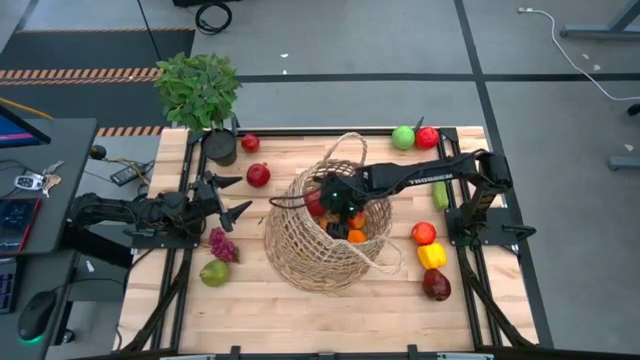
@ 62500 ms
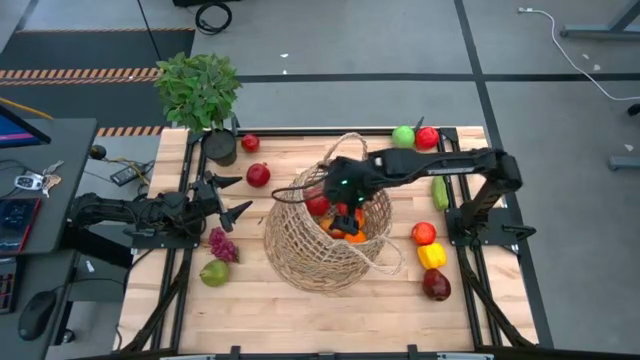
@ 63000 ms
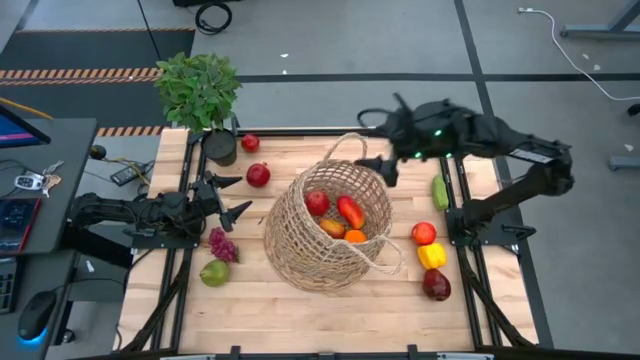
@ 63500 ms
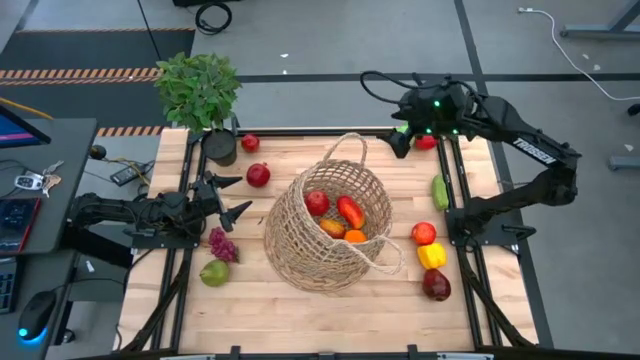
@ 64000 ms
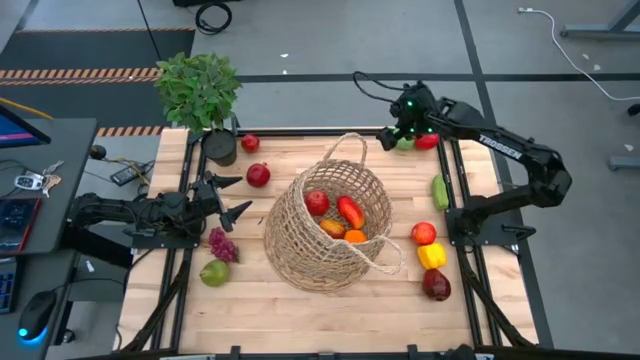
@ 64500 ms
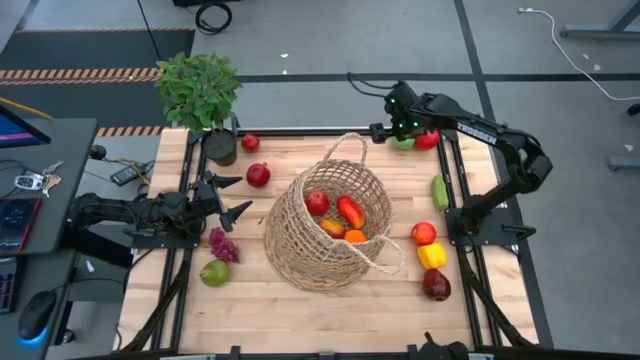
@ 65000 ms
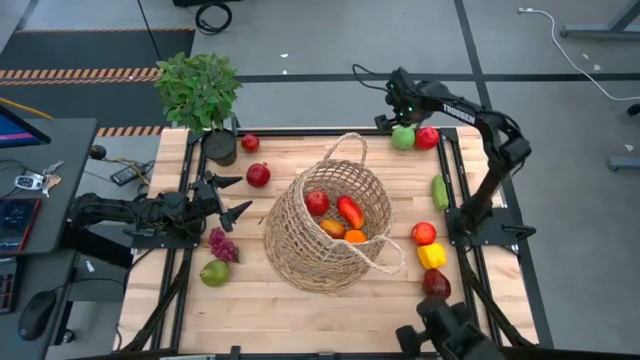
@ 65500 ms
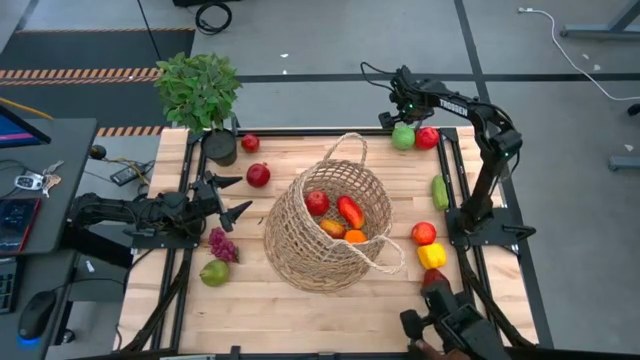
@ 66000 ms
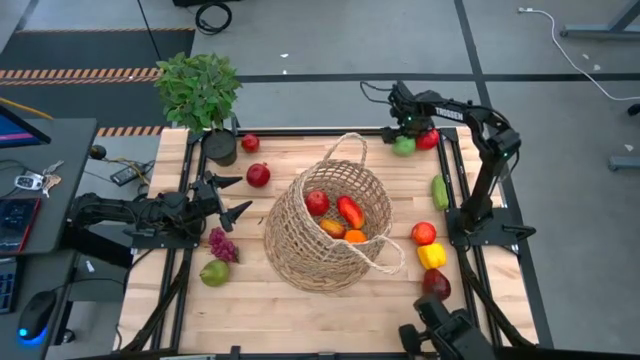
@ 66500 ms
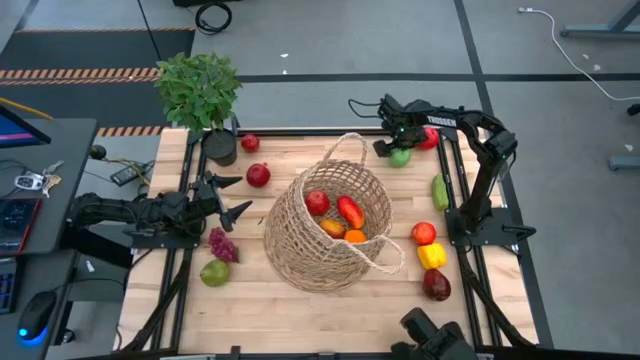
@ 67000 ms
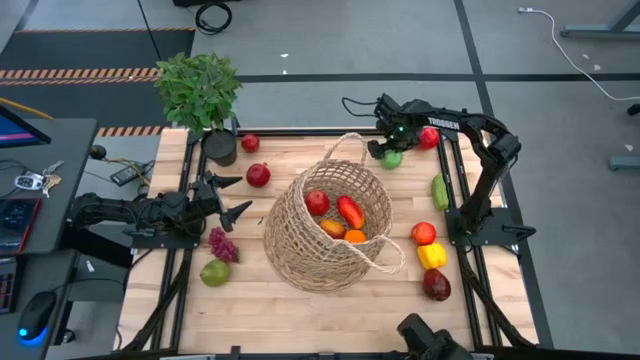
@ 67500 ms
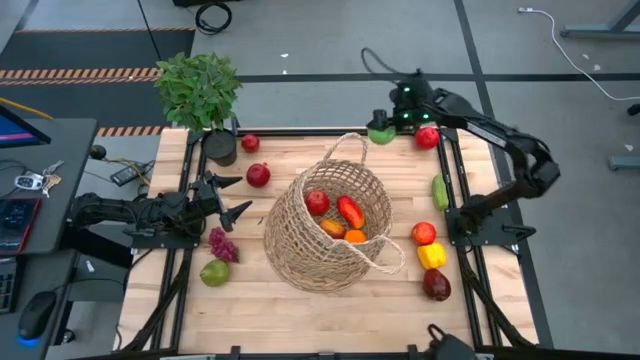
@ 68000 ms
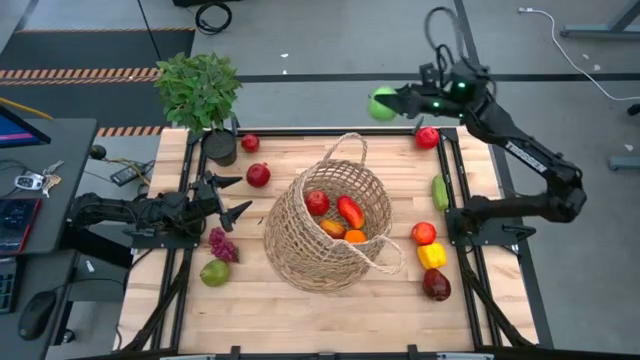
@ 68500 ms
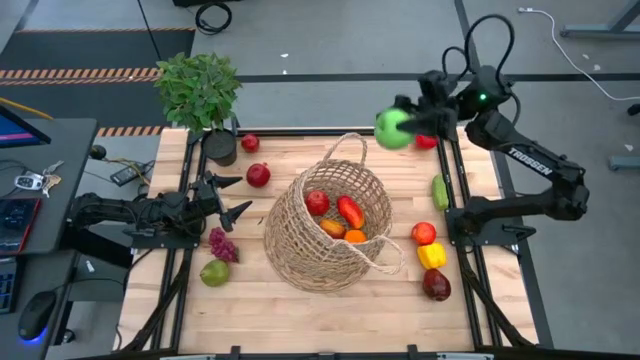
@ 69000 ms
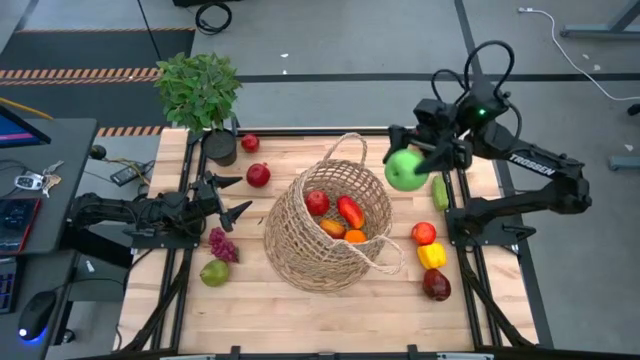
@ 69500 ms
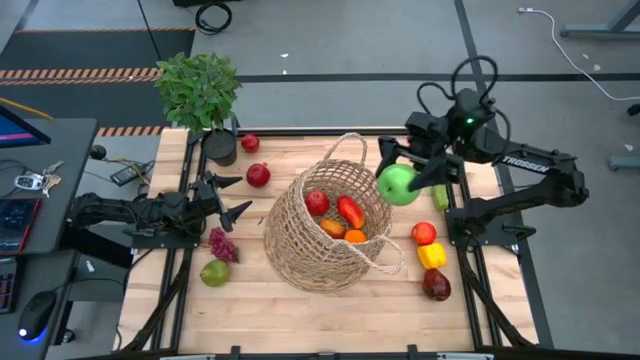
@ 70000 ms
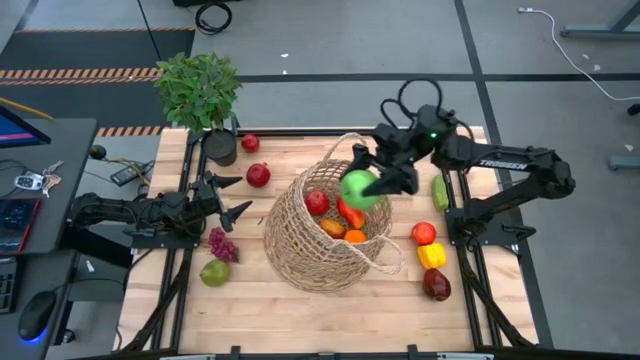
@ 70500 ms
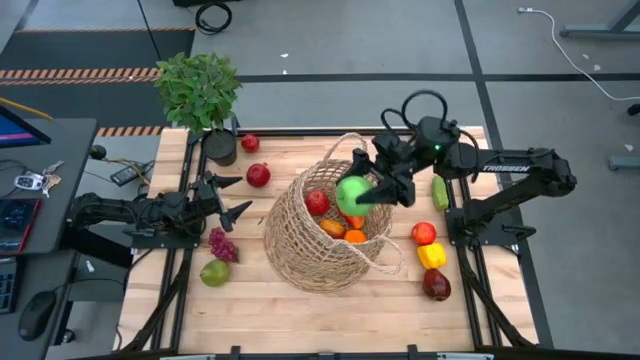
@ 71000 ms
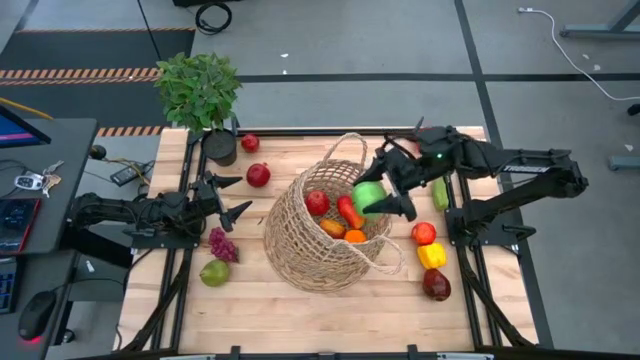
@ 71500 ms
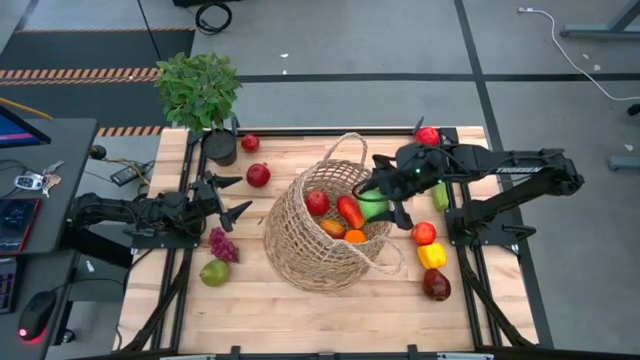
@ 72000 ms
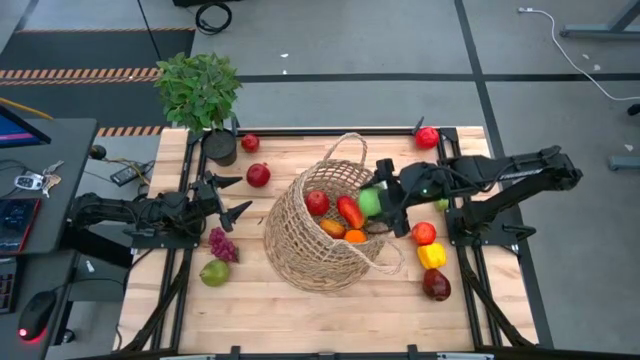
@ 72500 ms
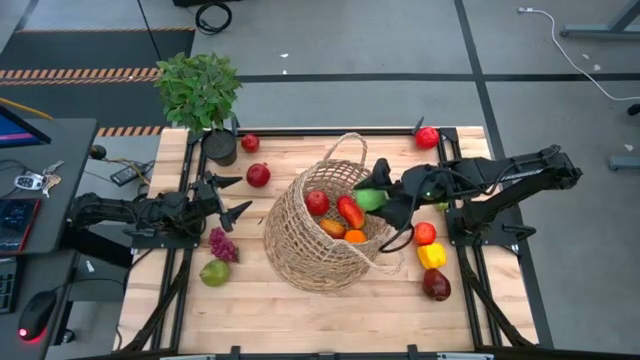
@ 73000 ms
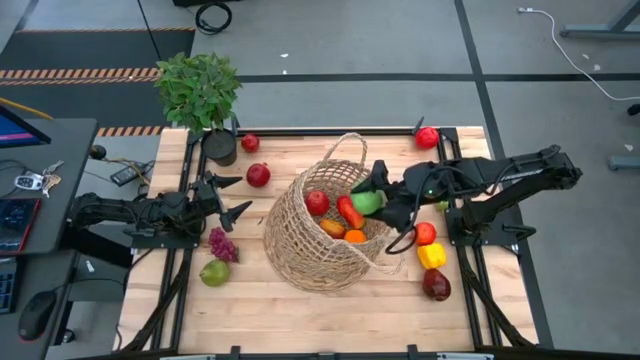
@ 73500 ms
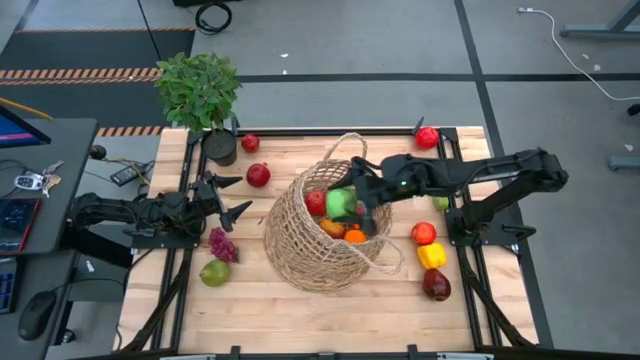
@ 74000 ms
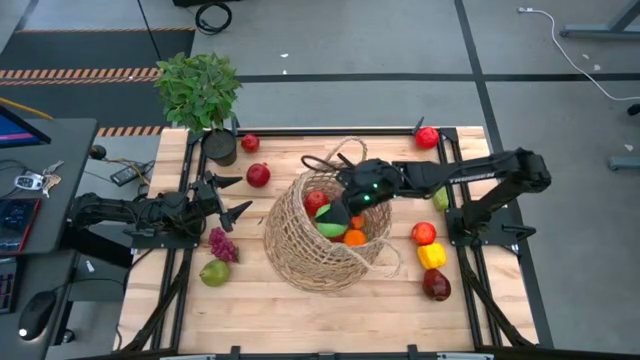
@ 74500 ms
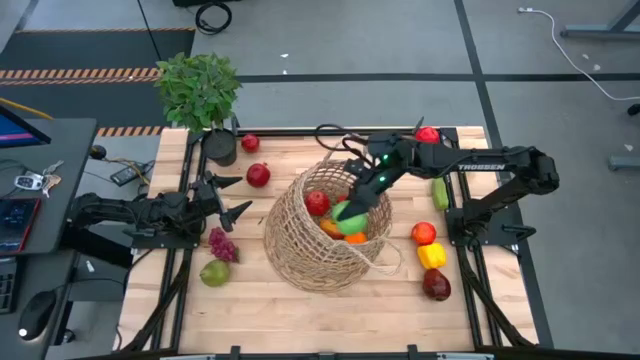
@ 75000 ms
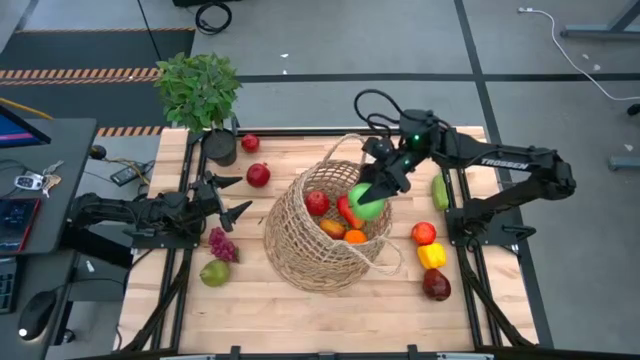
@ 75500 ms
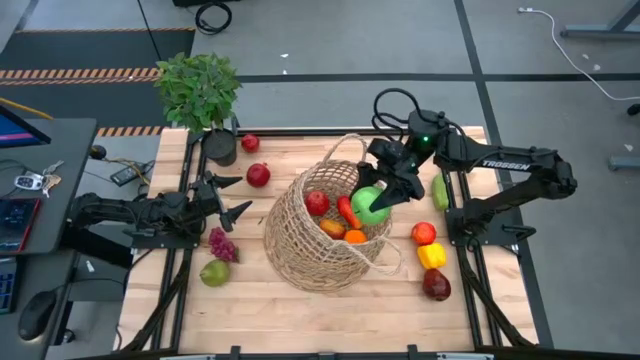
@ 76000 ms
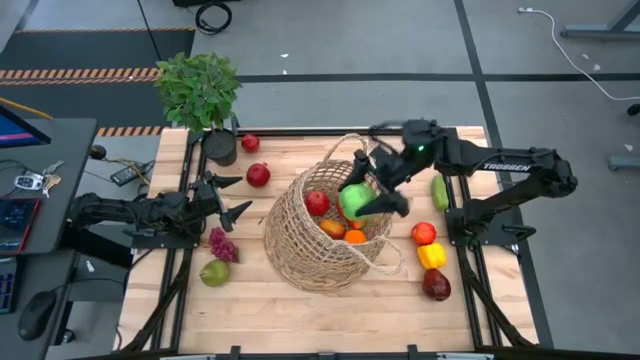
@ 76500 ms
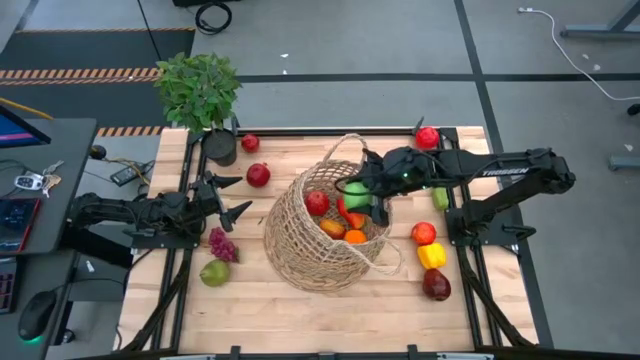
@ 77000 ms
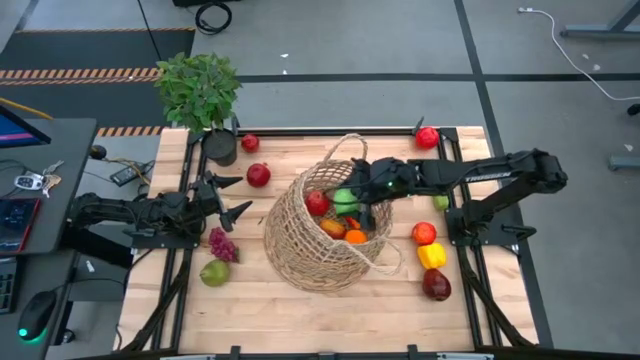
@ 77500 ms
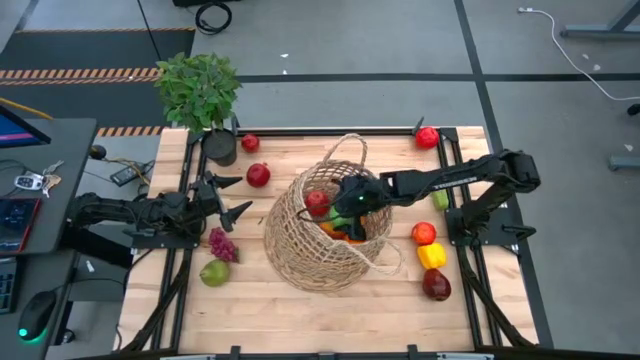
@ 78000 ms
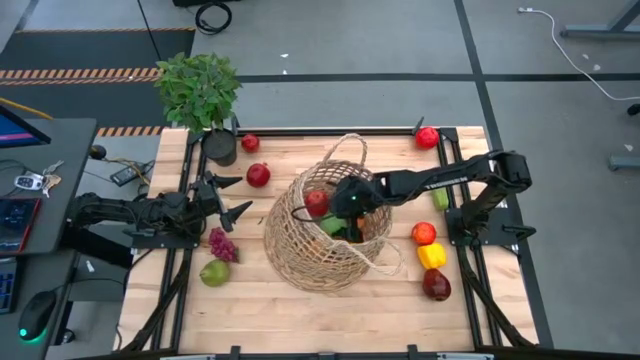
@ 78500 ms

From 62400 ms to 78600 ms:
Task: Build produce basket
Put the green apple into the brown basket

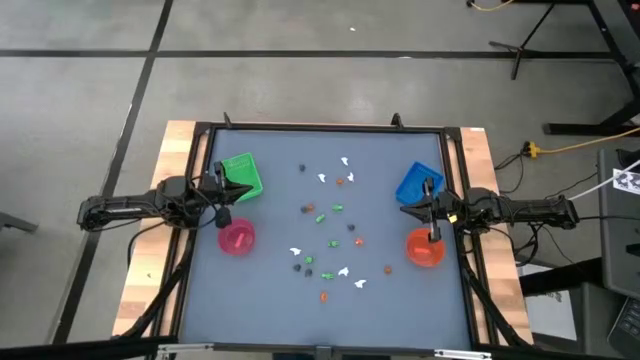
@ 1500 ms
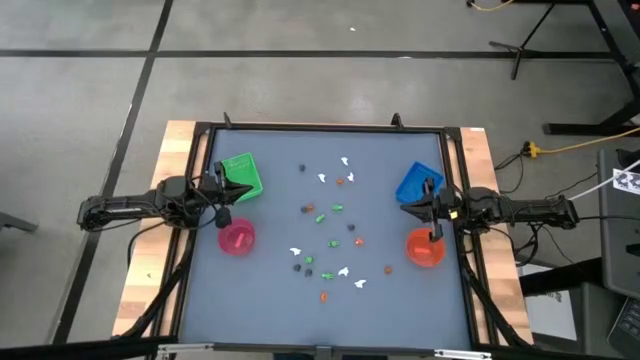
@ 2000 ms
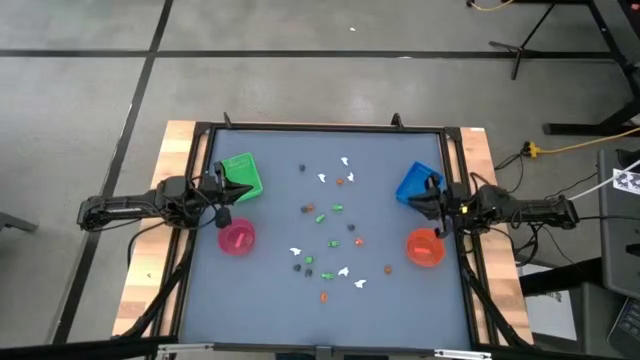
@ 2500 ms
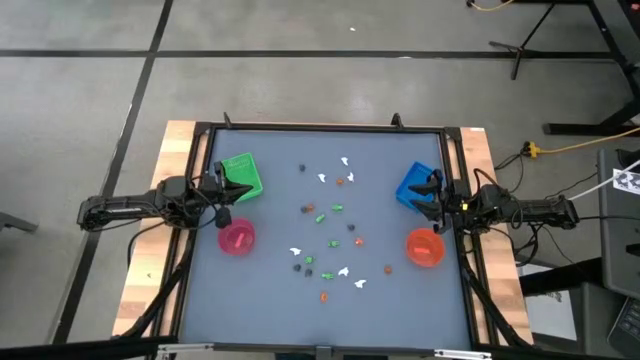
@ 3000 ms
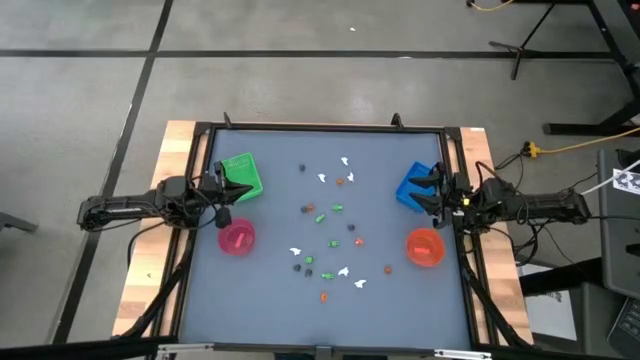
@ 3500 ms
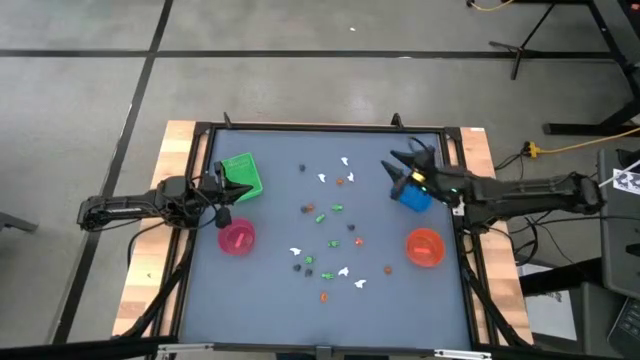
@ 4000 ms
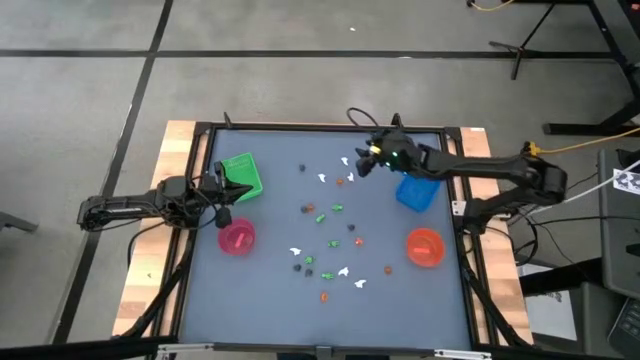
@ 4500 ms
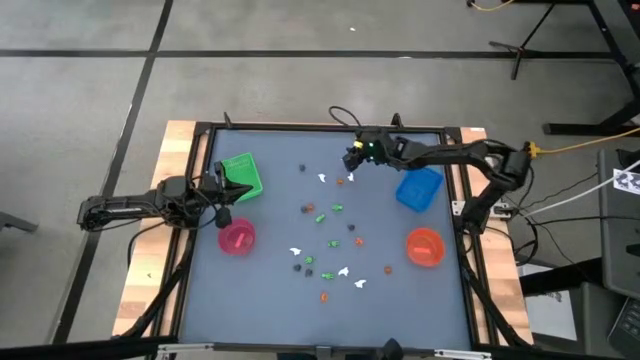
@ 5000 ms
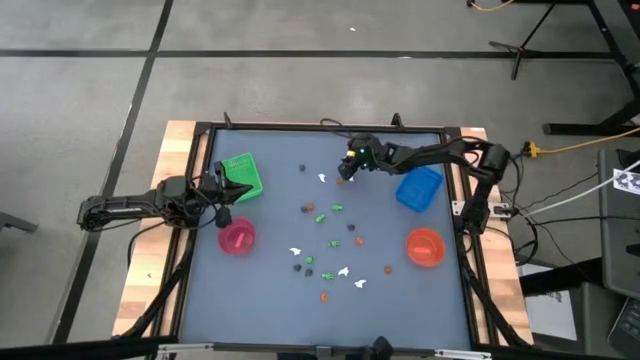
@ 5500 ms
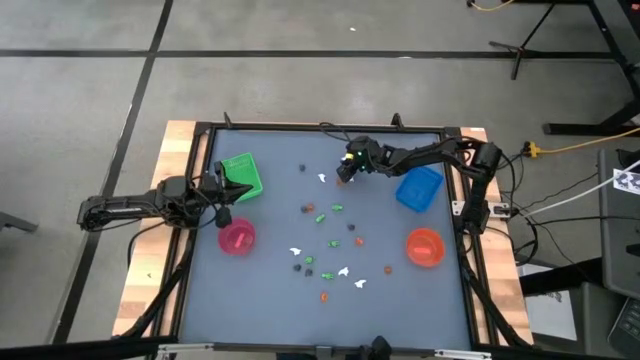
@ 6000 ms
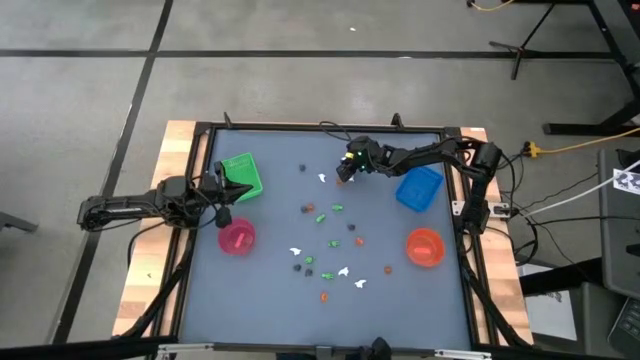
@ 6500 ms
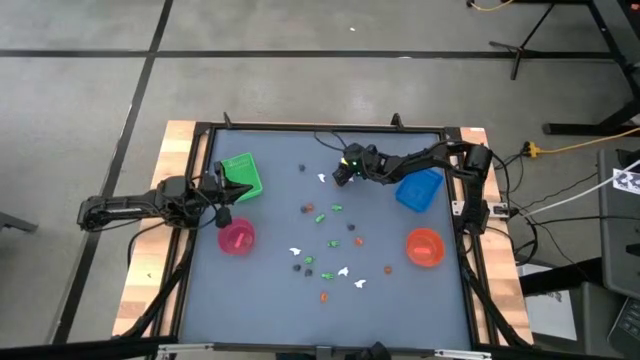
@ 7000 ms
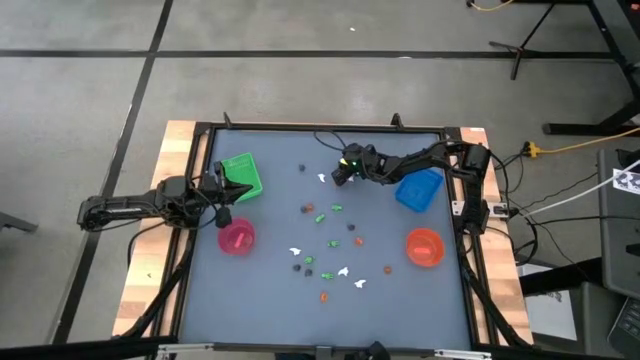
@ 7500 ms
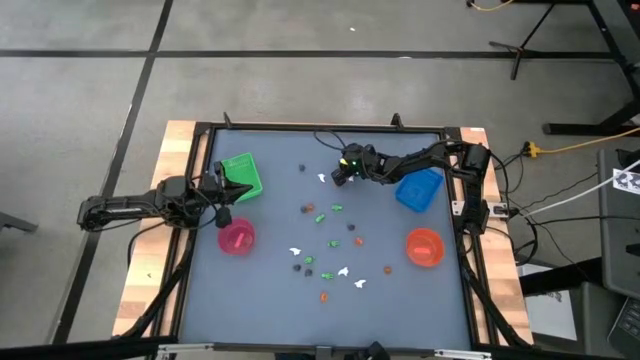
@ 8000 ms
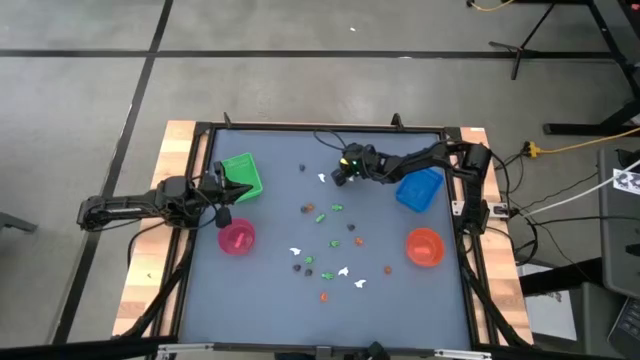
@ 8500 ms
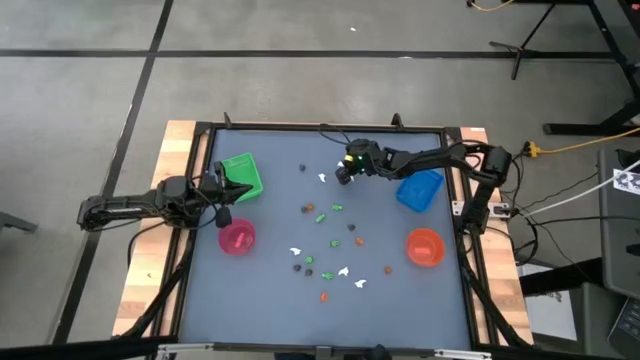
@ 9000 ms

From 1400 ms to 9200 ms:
Task: Sort Halloween decoration
Put the small white ghost toy into the blue basket
